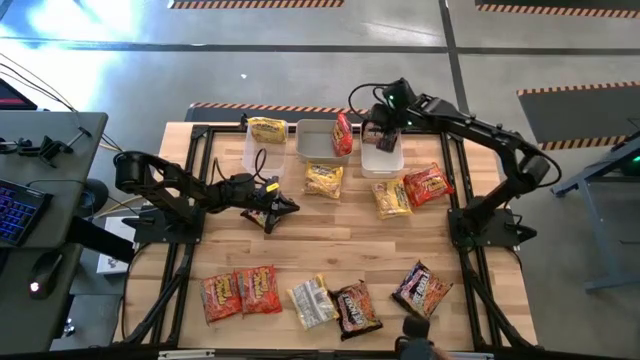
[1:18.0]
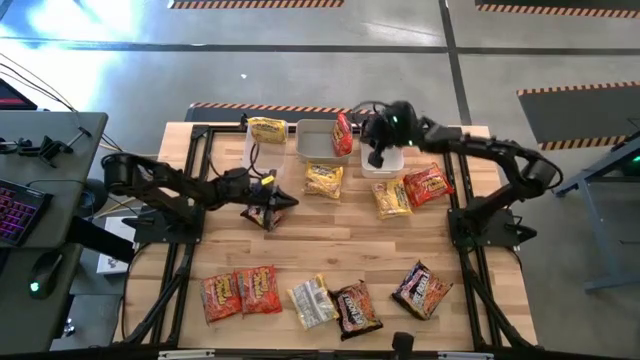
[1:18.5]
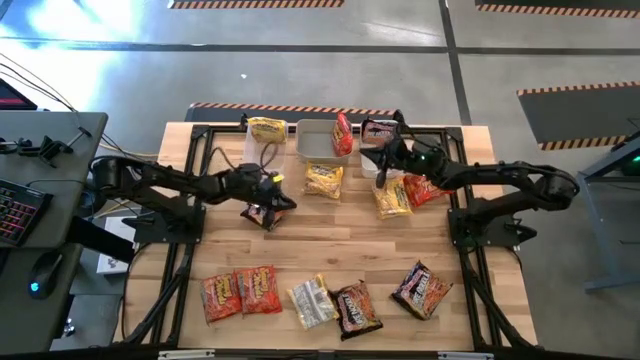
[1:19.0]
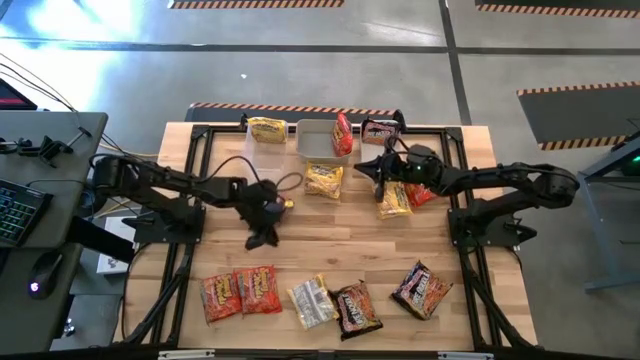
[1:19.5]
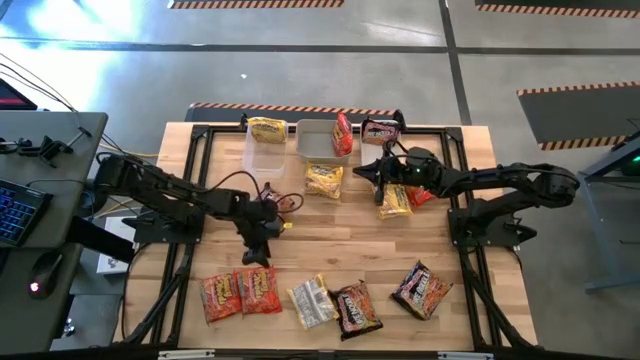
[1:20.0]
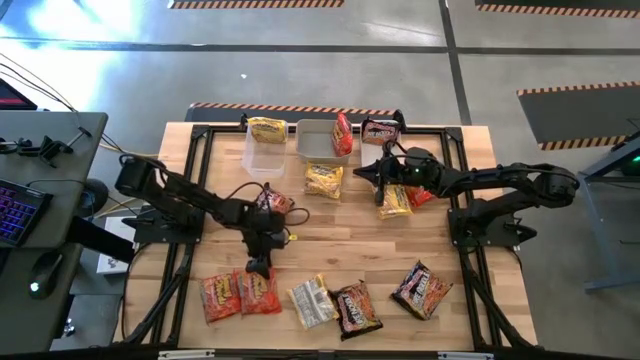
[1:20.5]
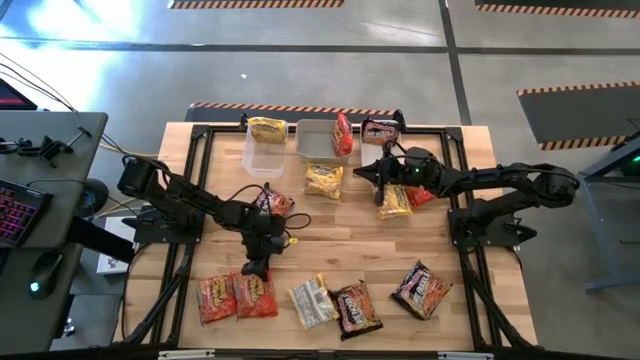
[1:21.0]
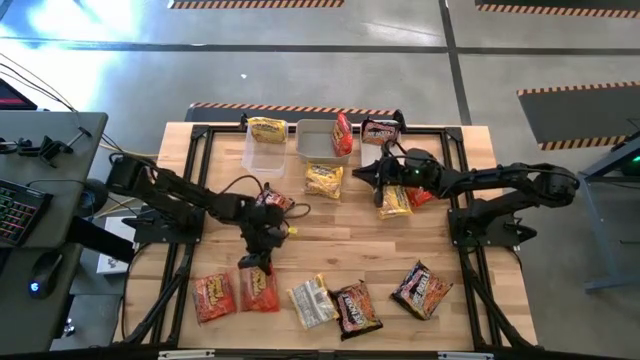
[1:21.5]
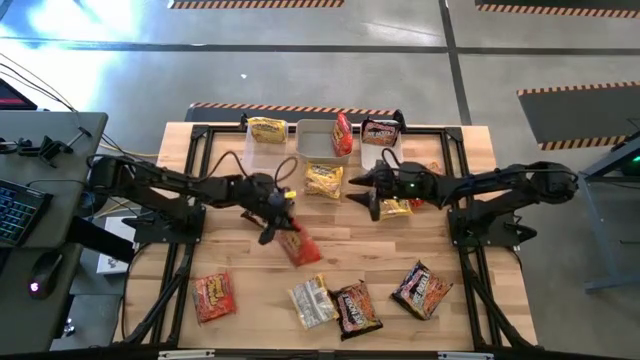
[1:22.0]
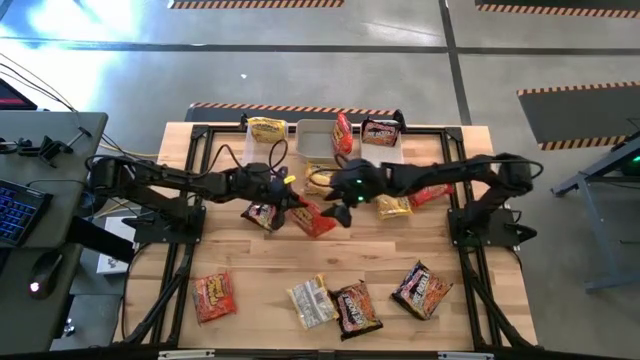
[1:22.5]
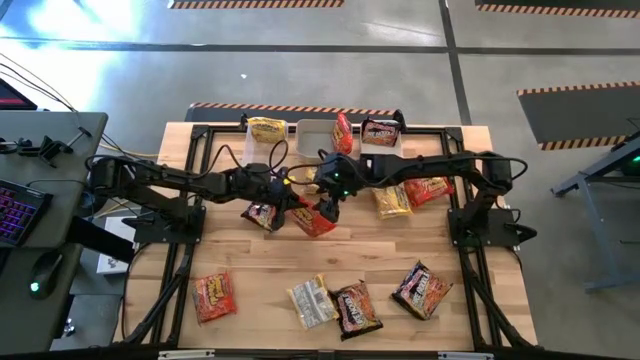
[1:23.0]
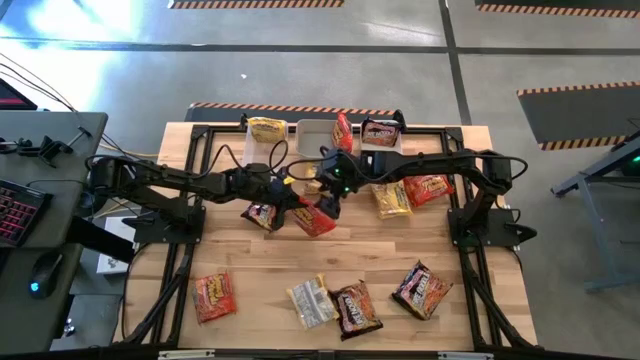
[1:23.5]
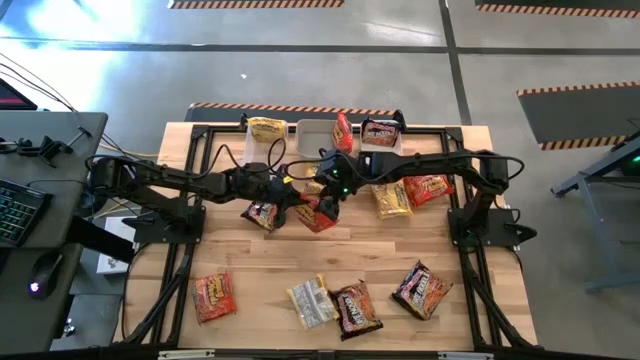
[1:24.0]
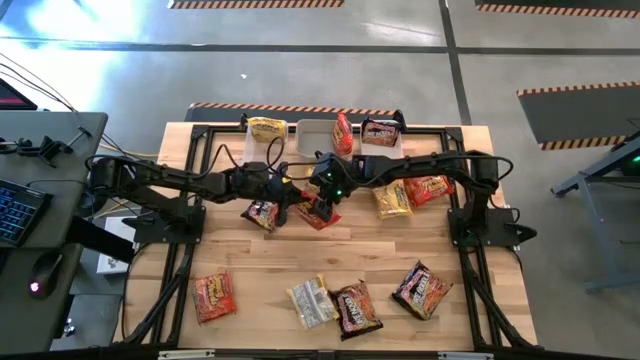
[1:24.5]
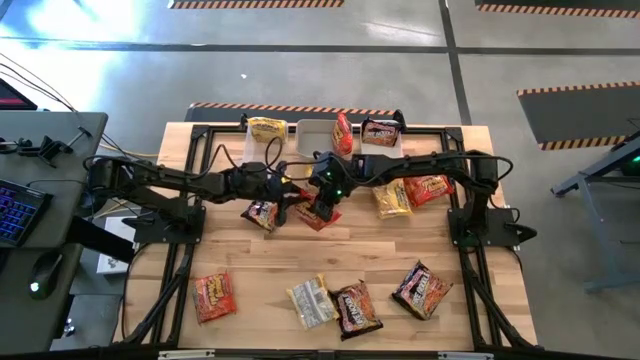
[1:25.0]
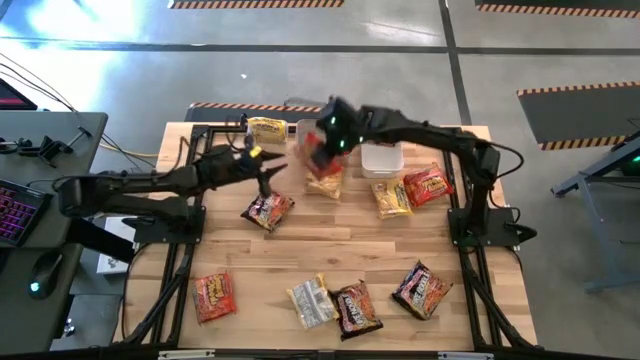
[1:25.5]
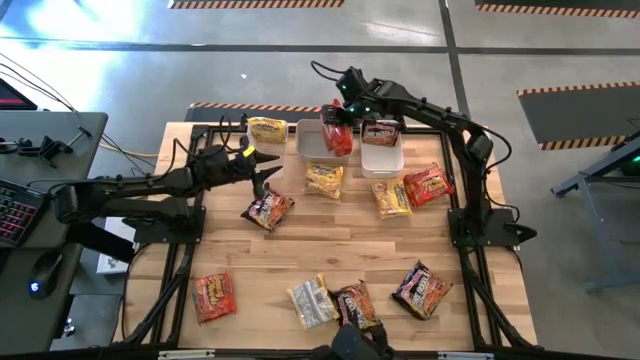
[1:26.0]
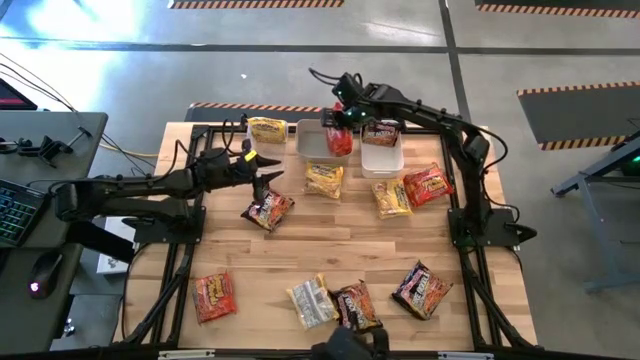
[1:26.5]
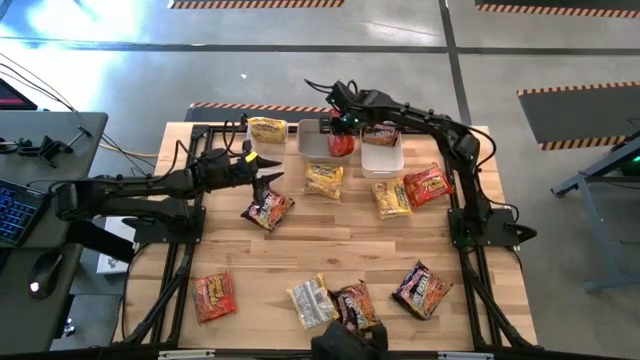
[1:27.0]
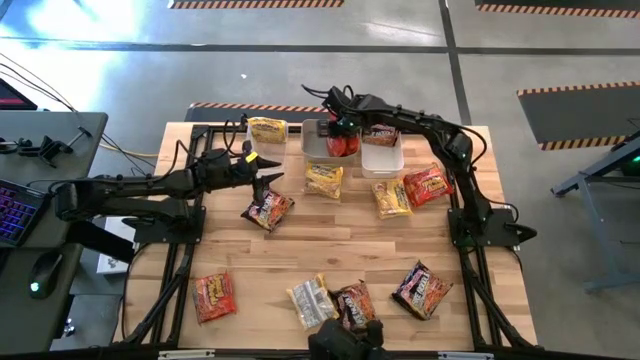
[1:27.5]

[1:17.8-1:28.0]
Task: Sort Maruchan noodles
Put the bottom right orange noodle pack into the gray bin

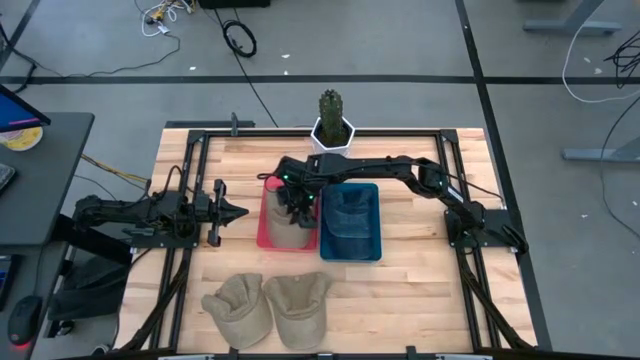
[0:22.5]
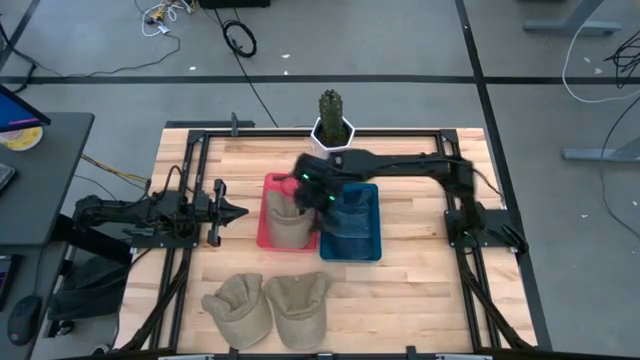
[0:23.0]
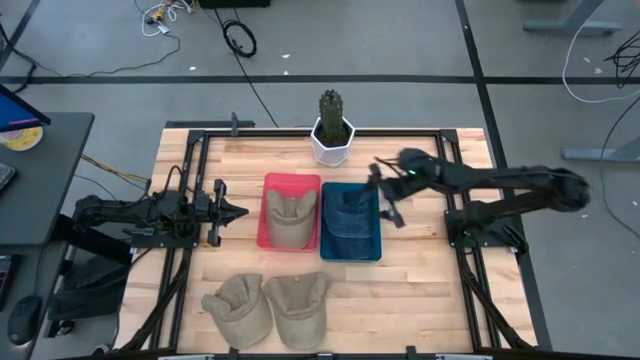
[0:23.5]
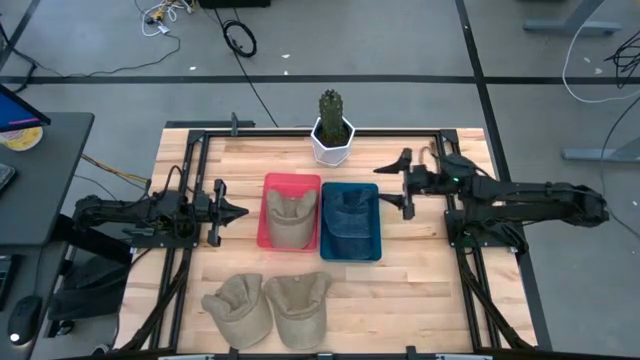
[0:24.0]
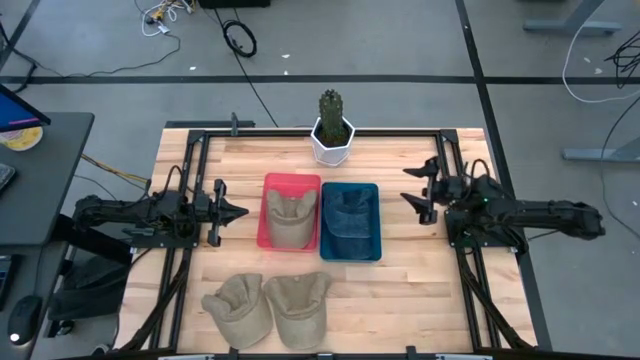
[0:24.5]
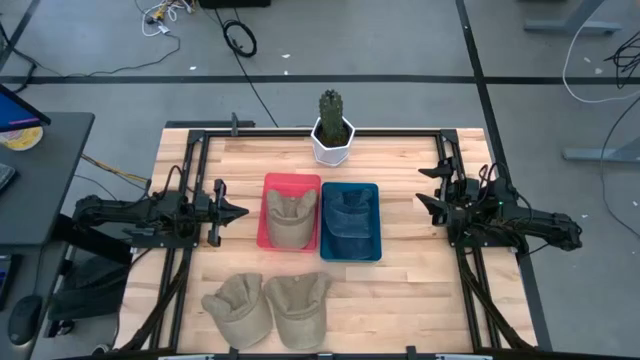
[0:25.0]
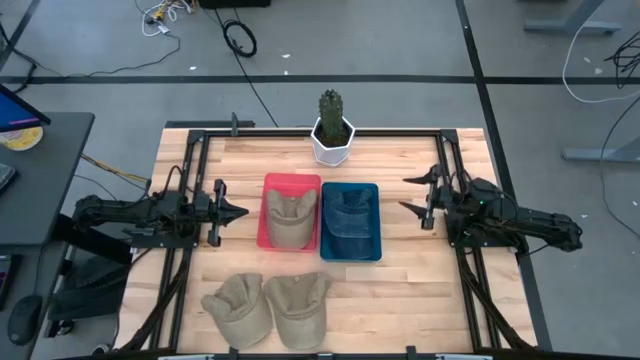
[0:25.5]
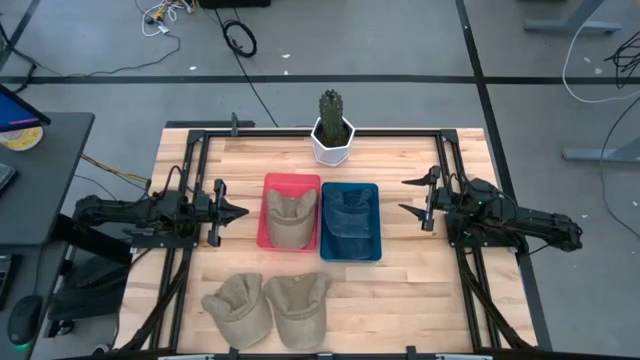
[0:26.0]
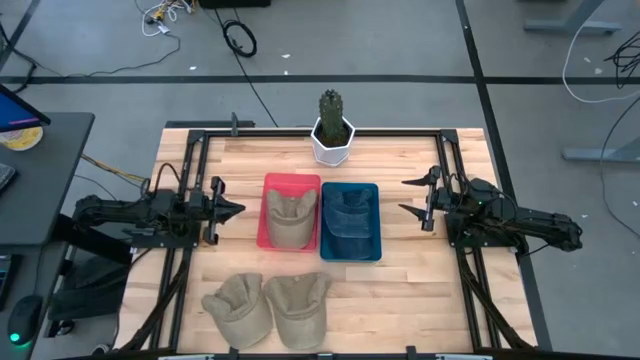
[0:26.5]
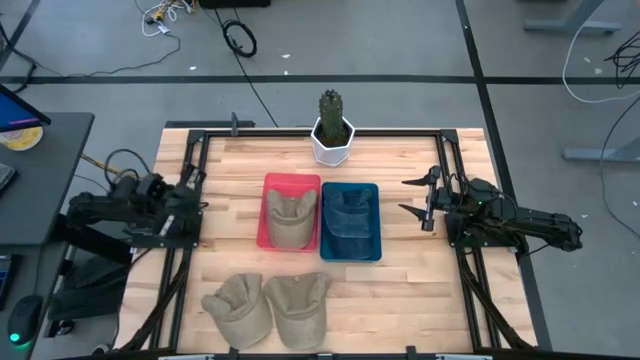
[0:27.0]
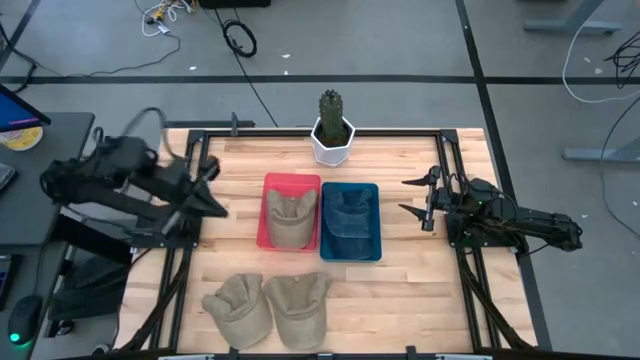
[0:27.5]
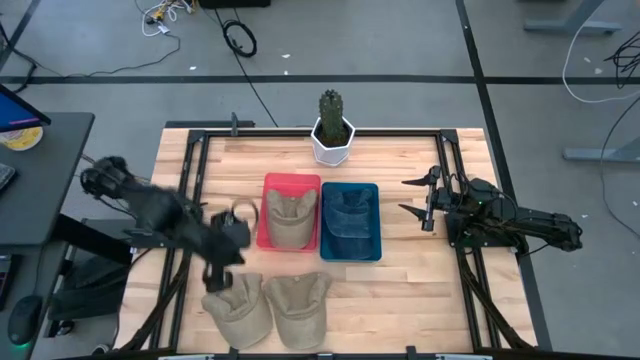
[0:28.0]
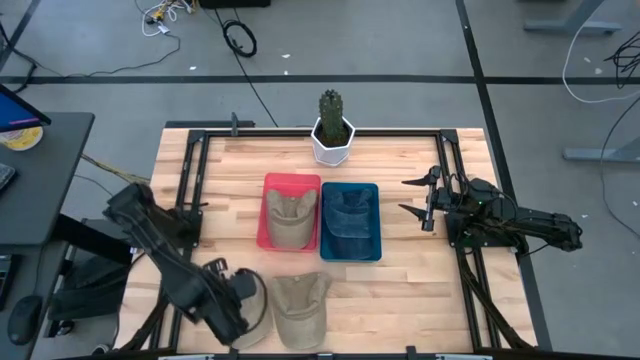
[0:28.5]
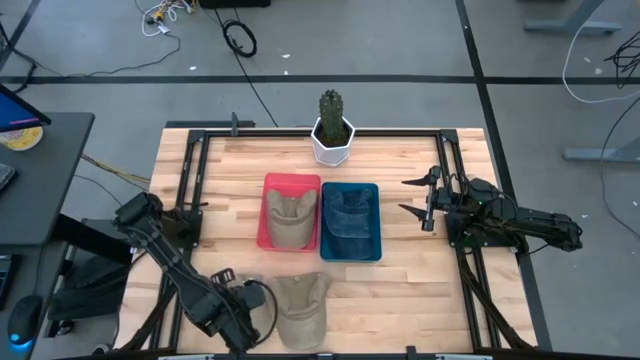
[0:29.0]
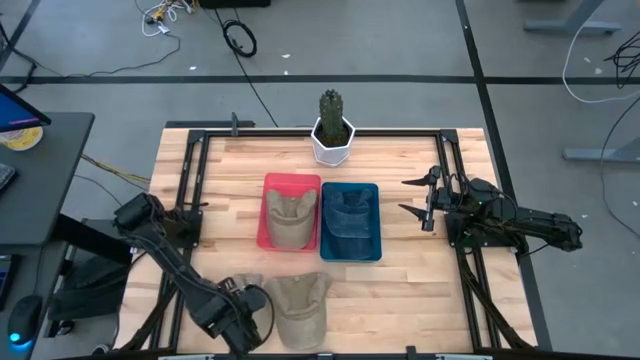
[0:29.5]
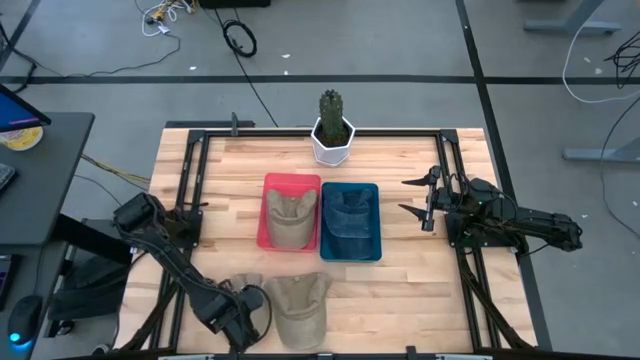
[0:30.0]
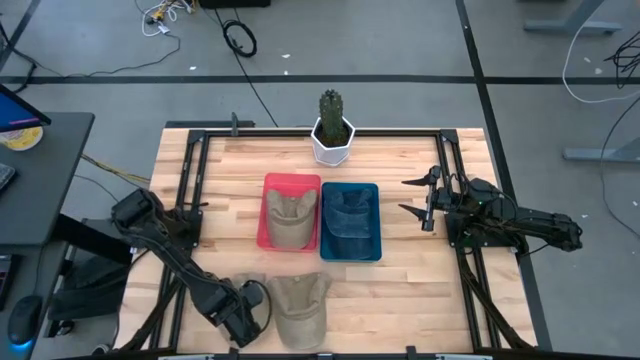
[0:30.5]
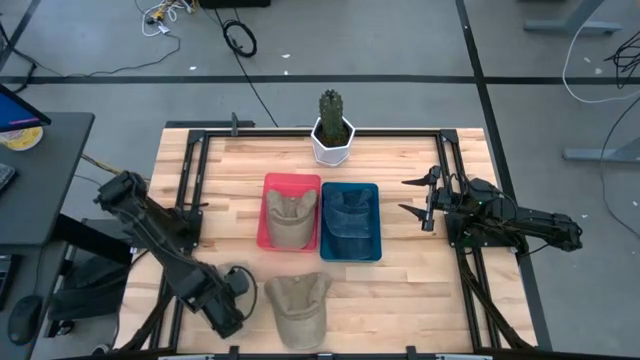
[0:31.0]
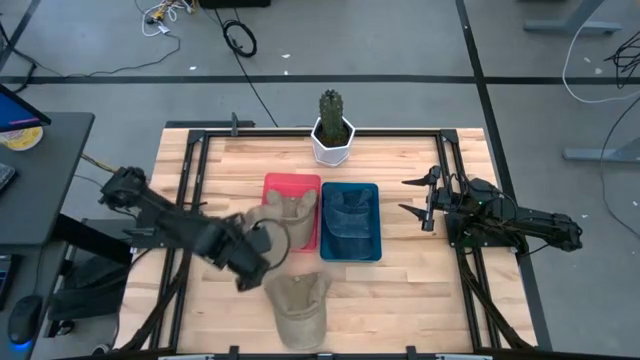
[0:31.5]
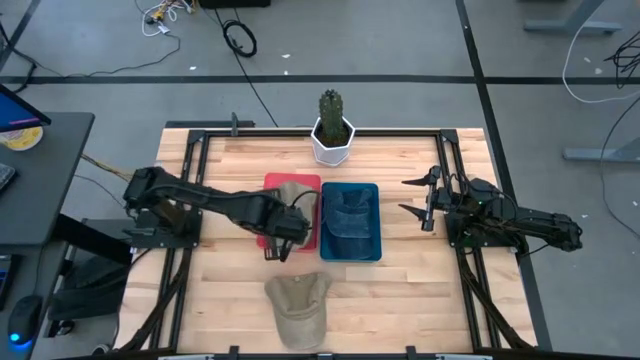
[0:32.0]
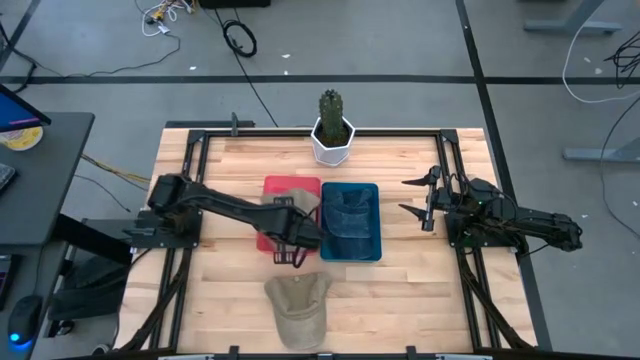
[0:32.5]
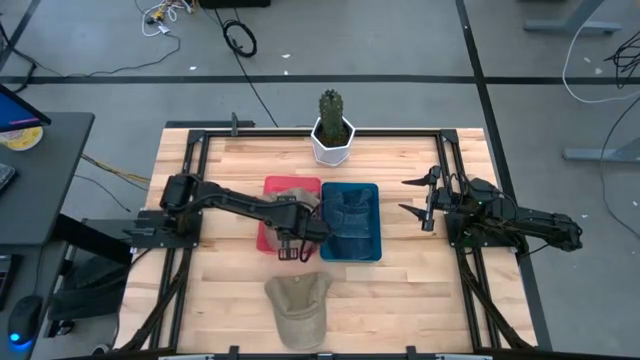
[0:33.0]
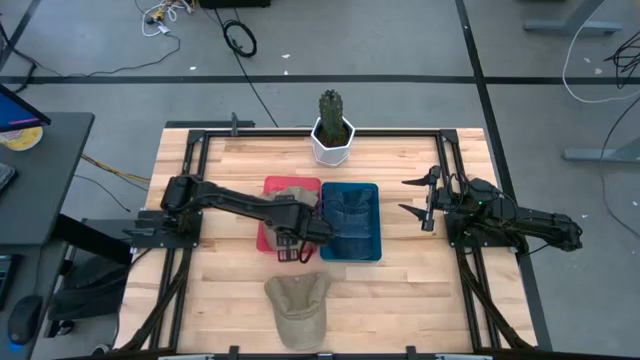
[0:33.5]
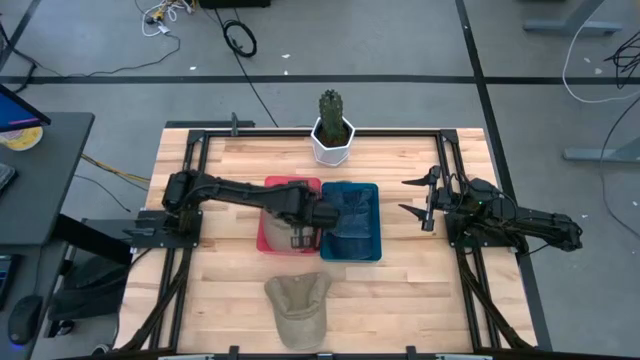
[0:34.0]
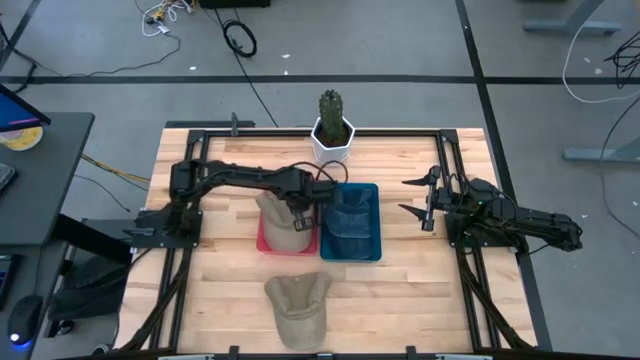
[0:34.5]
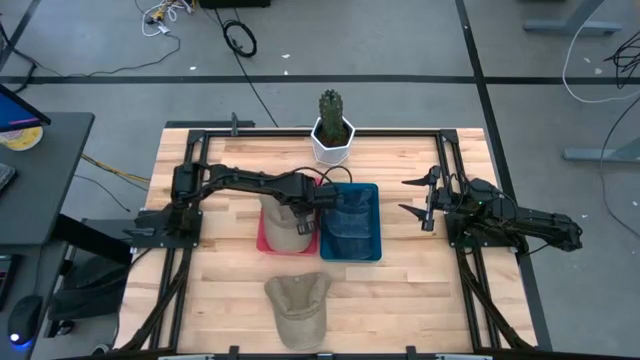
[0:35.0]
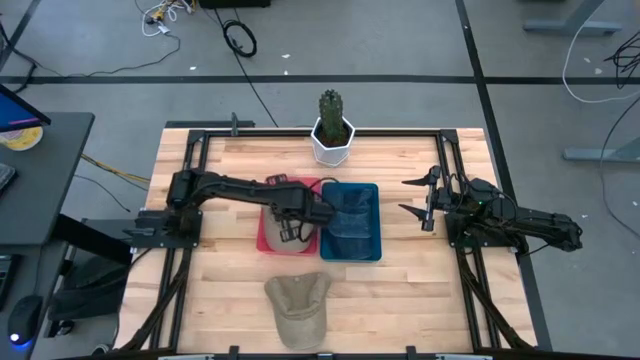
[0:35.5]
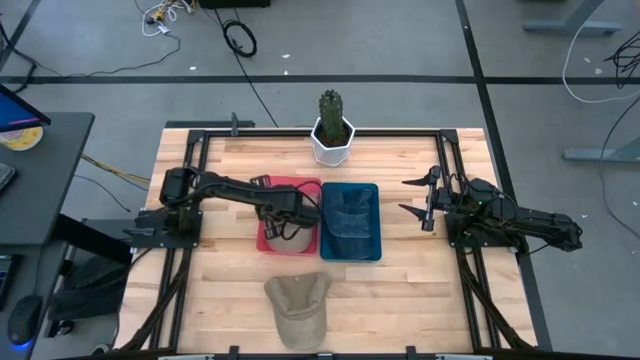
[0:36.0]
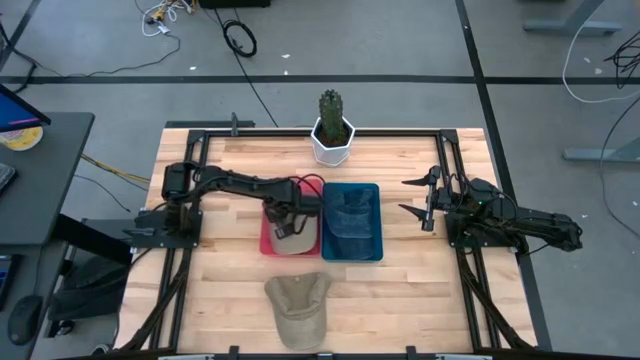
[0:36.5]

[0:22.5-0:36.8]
Task: Pick & Place hat
Put the left brown cap into the pink bin
